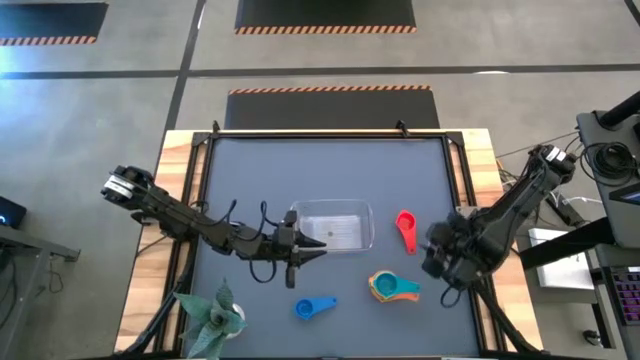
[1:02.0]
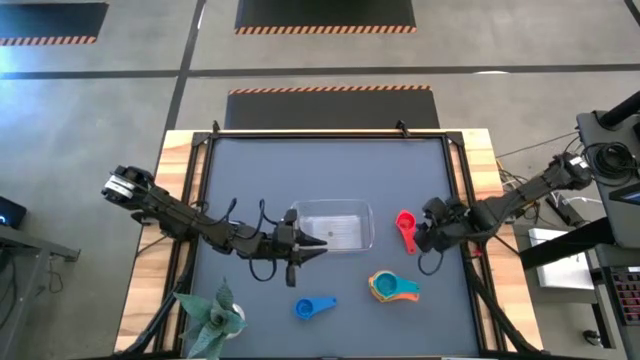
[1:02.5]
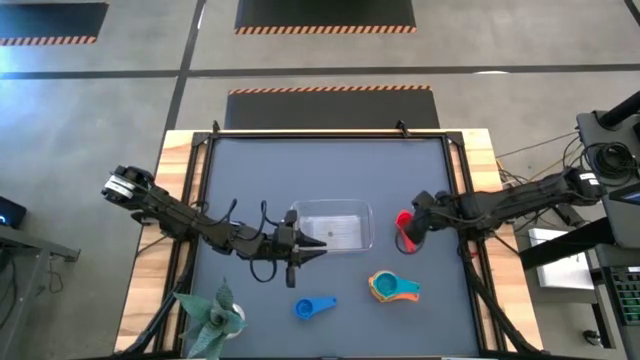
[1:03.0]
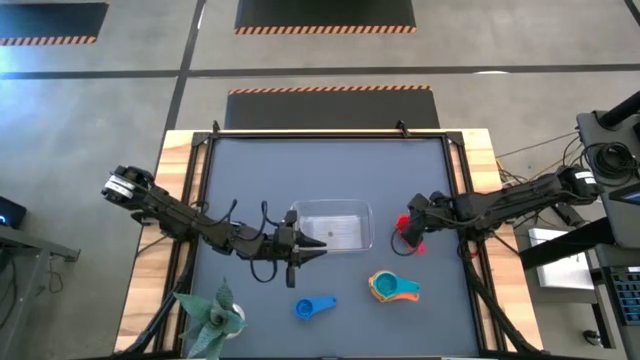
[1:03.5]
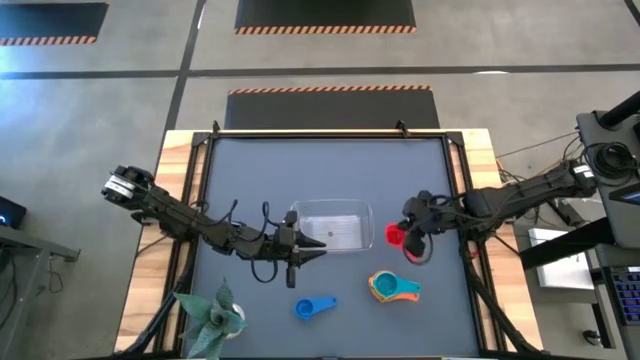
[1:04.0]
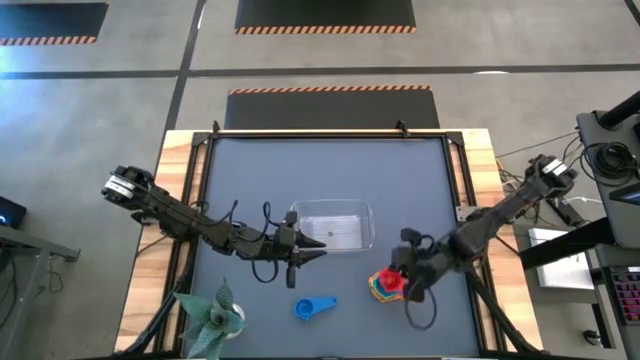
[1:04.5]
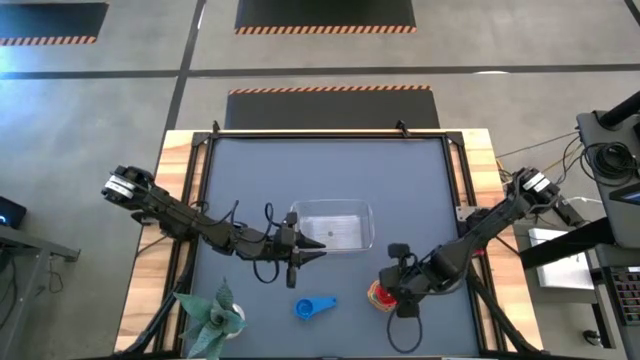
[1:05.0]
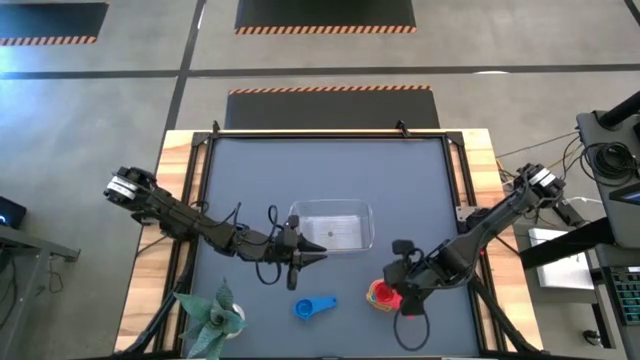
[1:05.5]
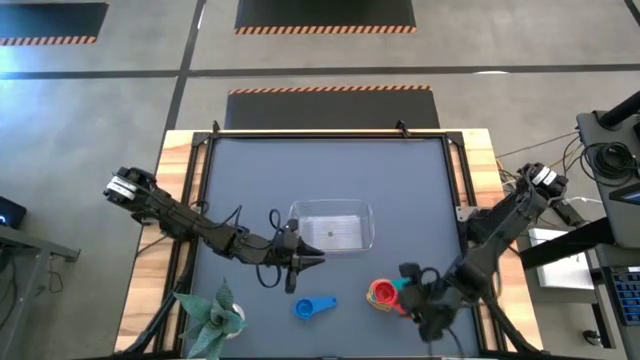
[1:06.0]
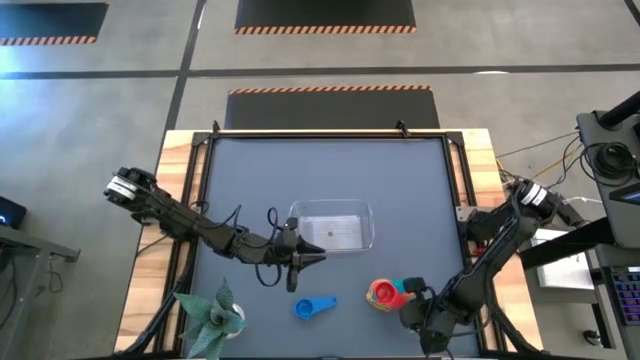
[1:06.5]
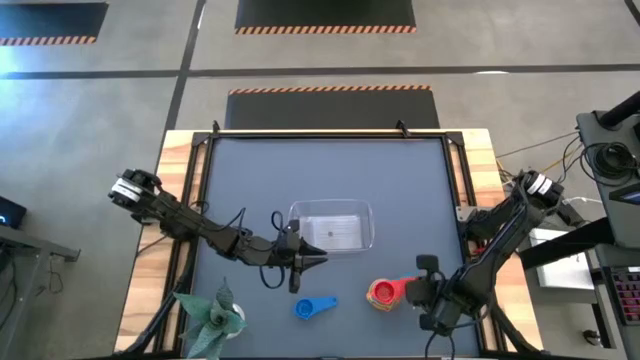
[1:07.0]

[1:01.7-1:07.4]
Task: Nest measuring cups in basket
Stack the red measuring cup on top of the light blue measuring cup

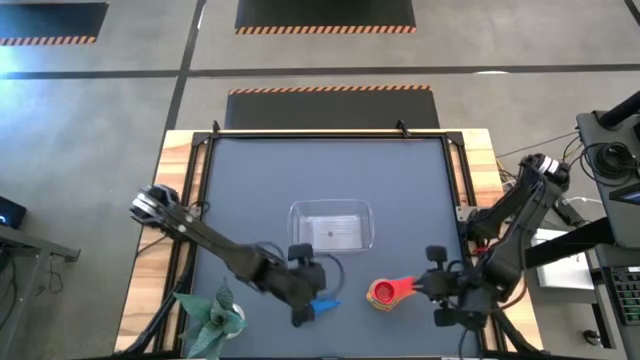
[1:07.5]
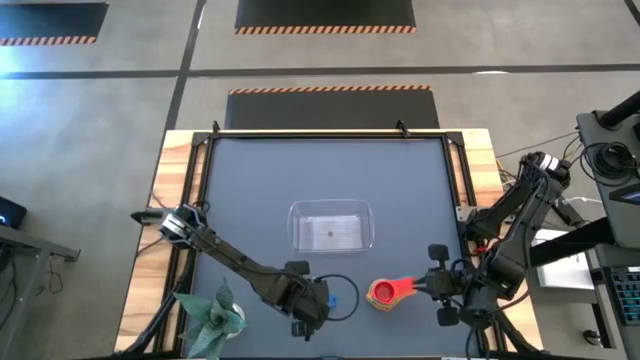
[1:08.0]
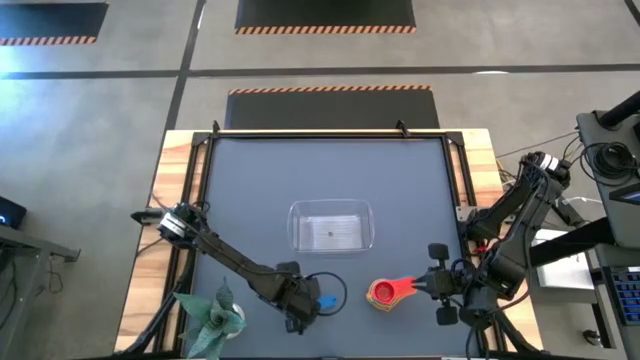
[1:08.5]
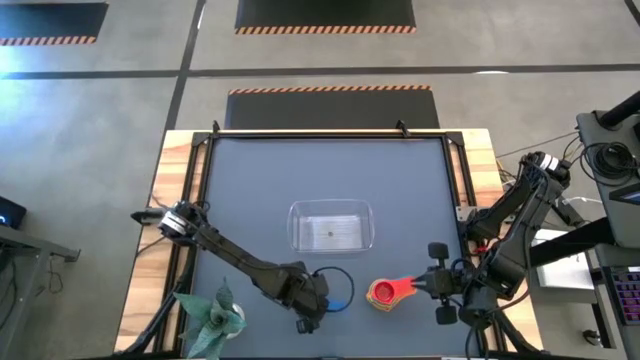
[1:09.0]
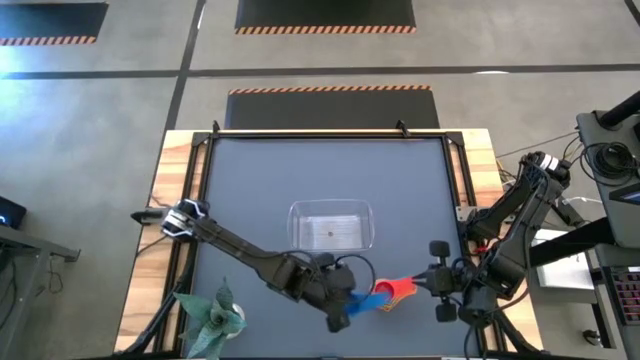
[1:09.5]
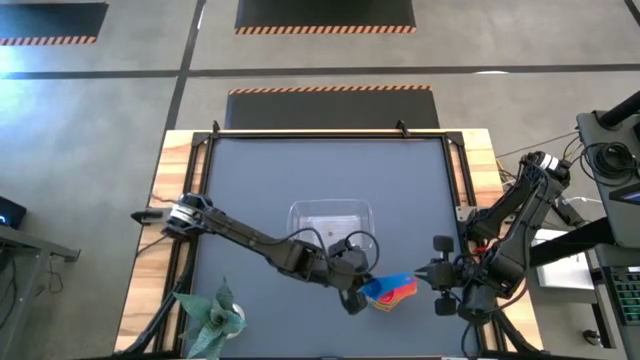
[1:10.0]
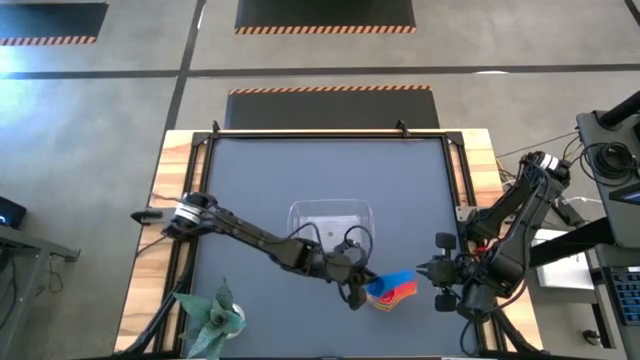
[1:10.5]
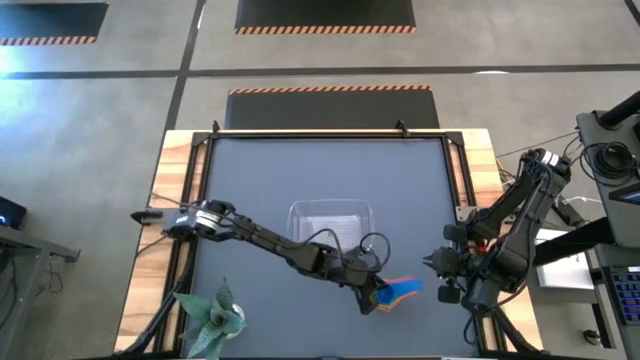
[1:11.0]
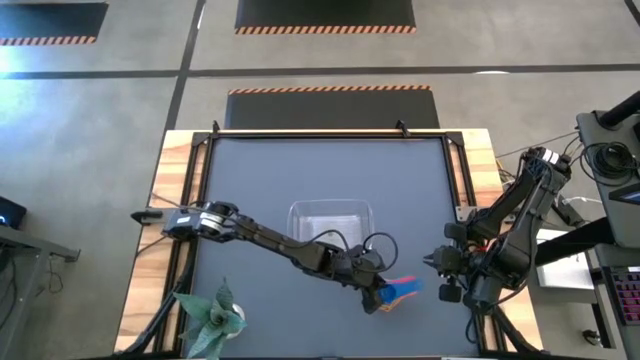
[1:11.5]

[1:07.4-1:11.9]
Stack the blue measuring cup on top of the red measuring cup

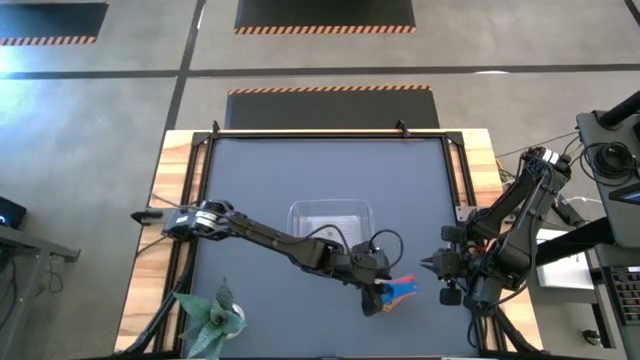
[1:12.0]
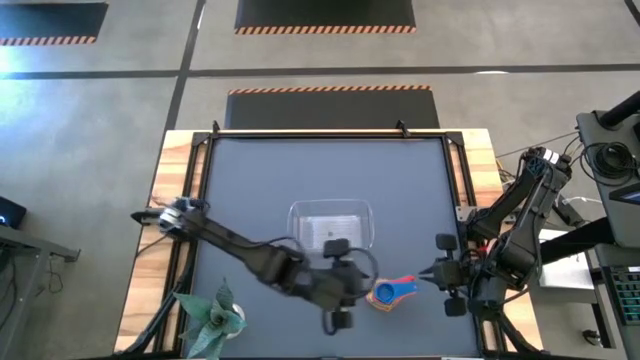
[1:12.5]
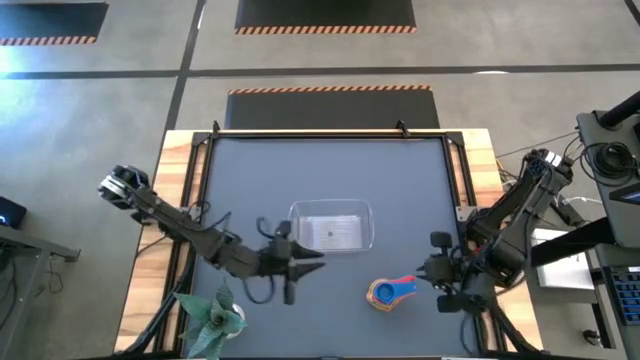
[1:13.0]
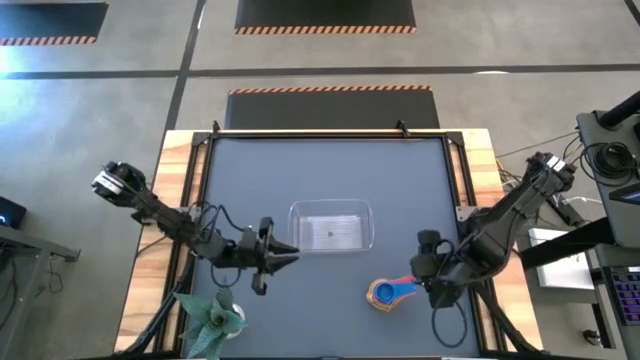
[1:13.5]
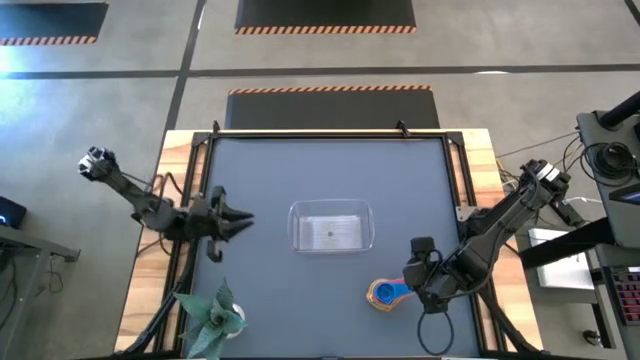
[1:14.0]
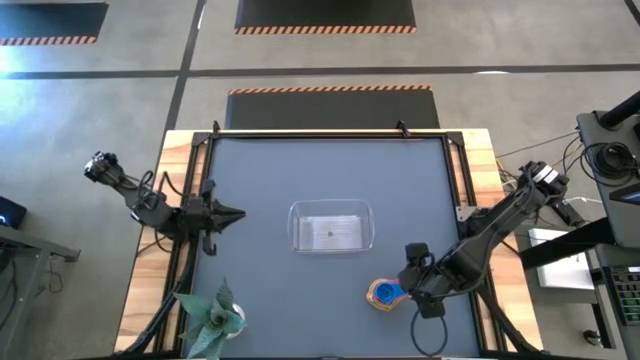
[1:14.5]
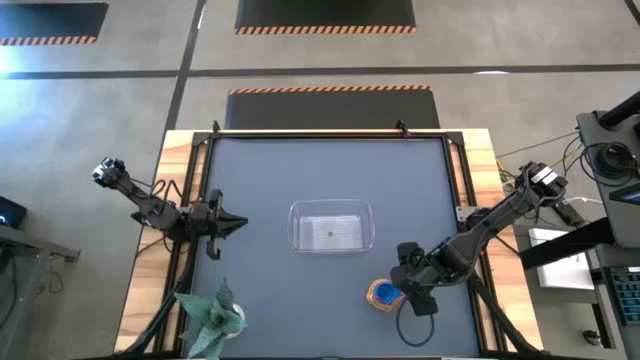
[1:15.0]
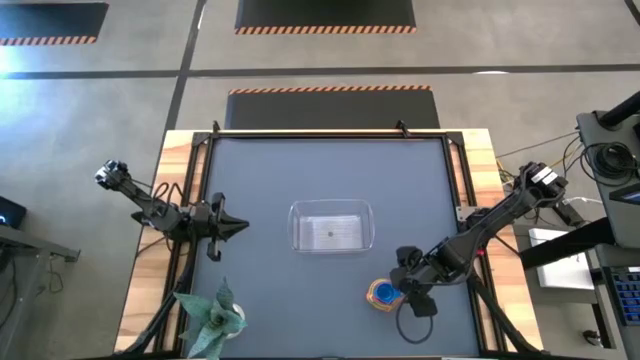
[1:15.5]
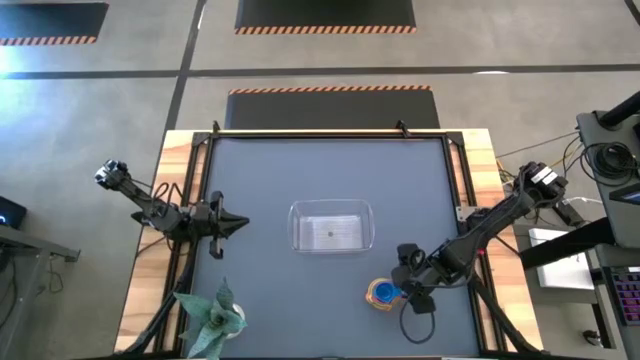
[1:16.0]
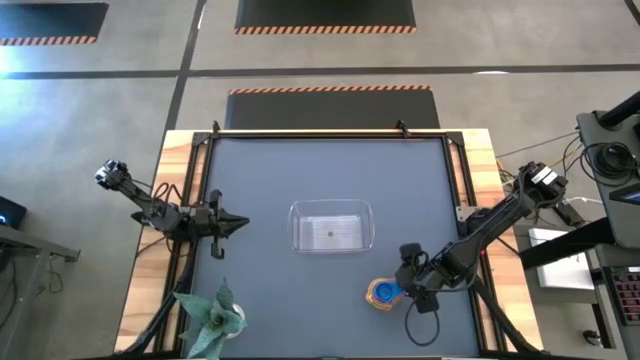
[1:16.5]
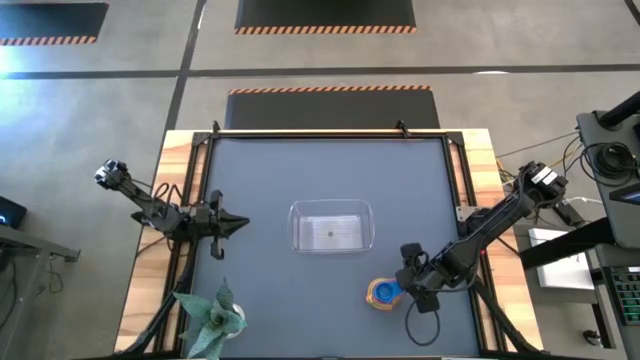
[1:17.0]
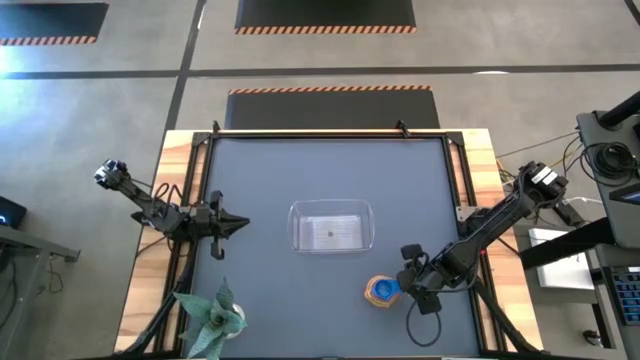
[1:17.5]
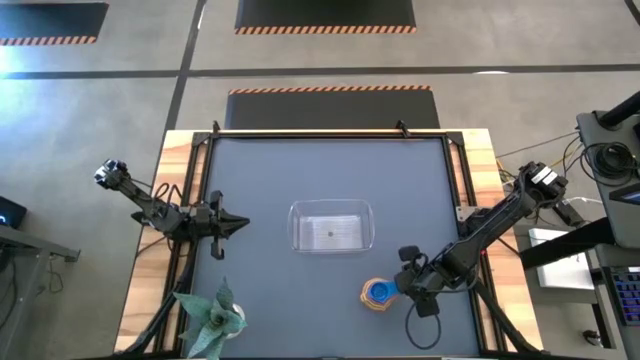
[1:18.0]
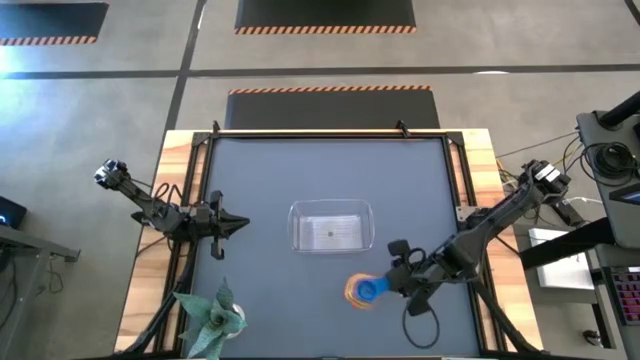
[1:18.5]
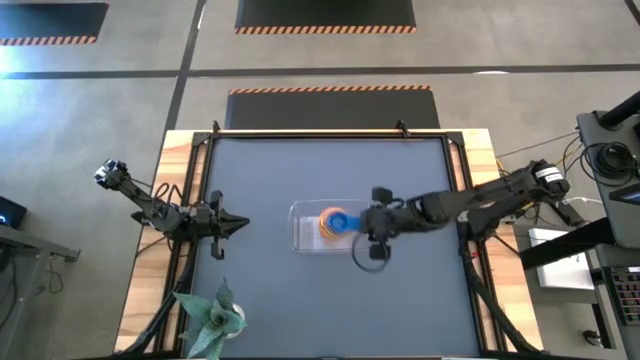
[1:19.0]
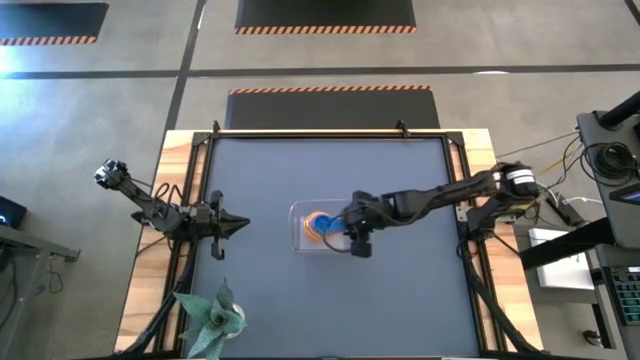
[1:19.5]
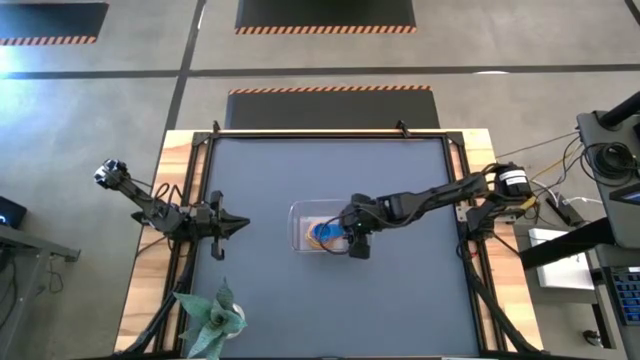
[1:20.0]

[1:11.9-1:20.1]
Put the stacked measuring cups into the transparent bin

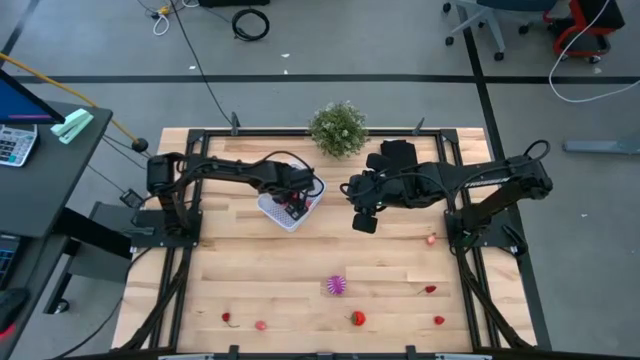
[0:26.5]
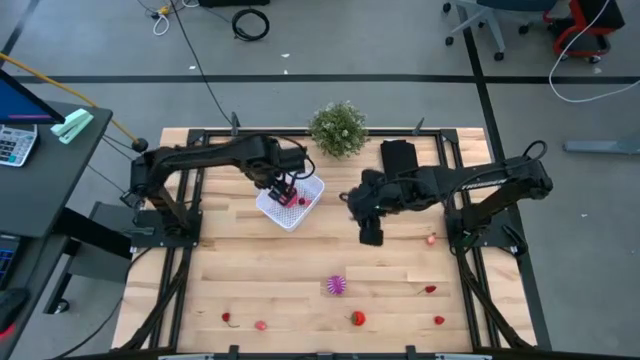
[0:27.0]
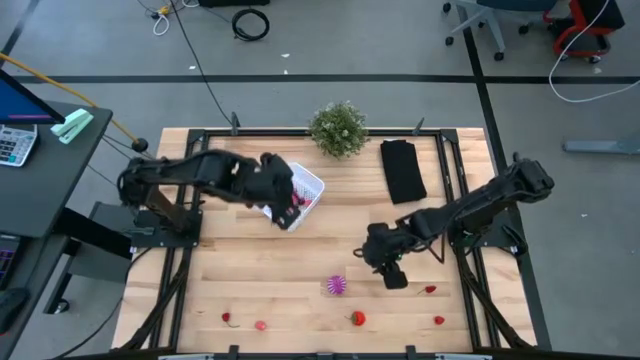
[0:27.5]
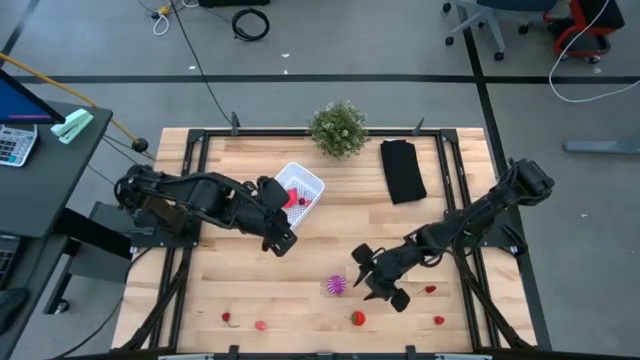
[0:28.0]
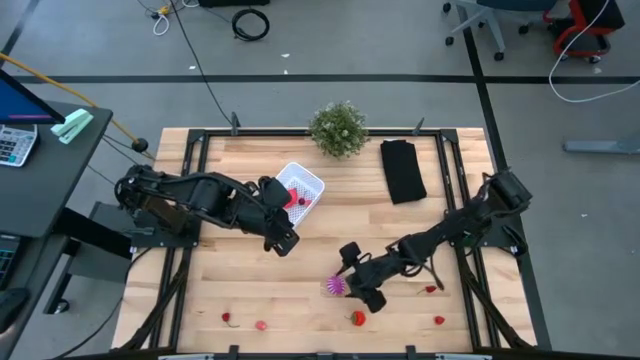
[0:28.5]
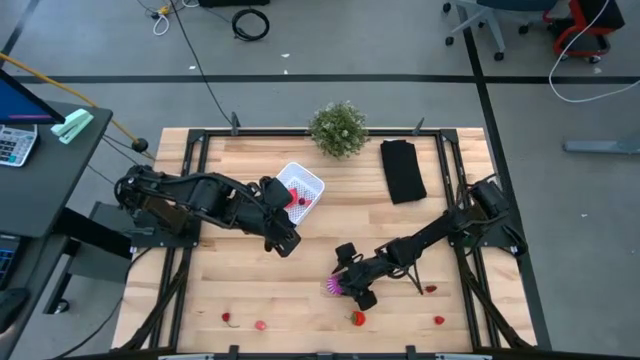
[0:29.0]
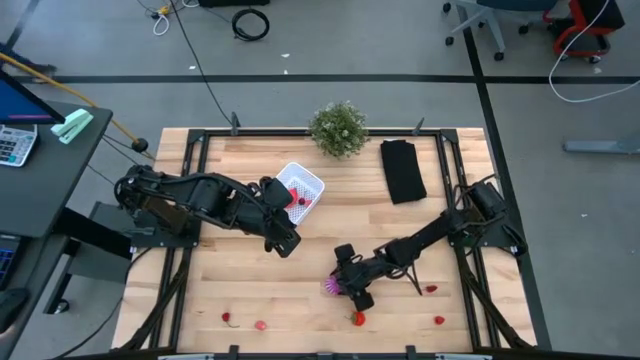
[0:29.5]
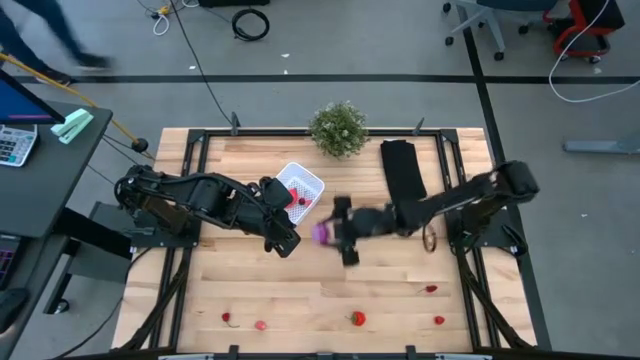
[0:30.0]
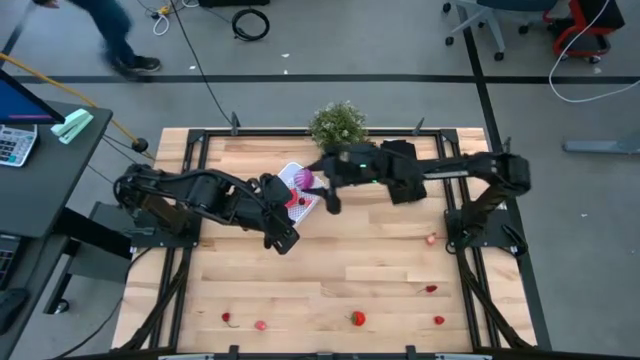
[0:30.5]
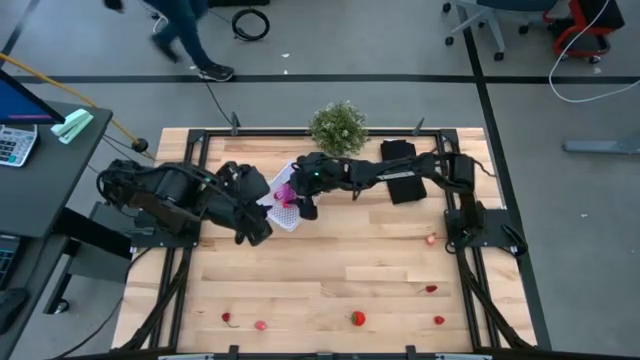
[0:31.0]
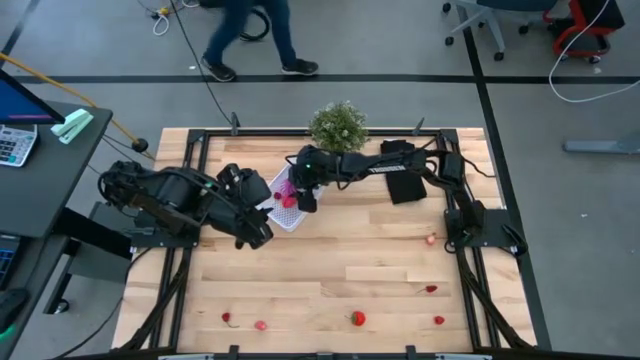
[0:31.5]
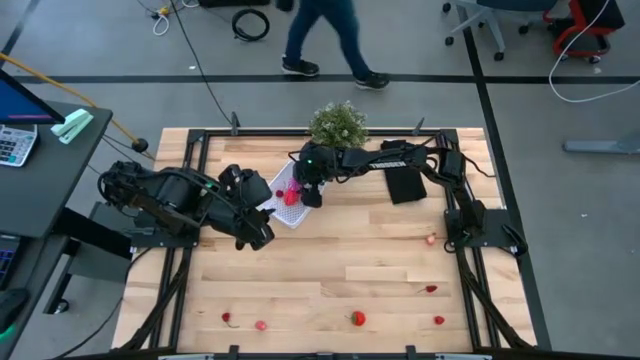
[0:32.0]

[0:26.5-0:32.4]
Task: Pick and placing Produce into tupperware
Put the violet onion into the white basket
